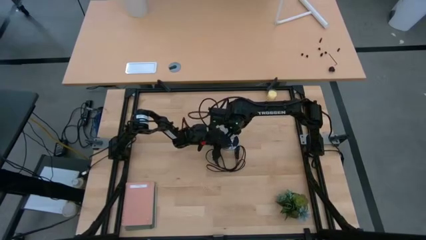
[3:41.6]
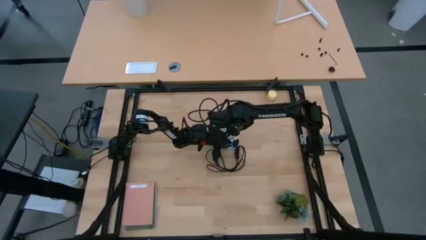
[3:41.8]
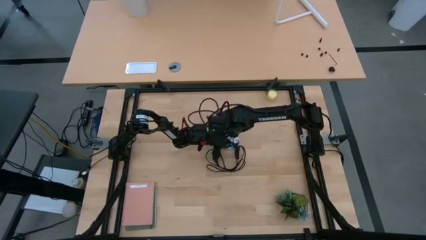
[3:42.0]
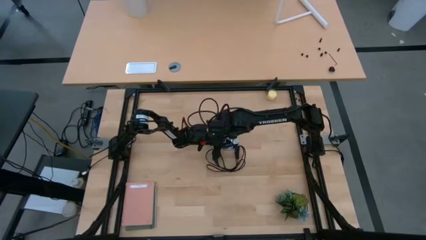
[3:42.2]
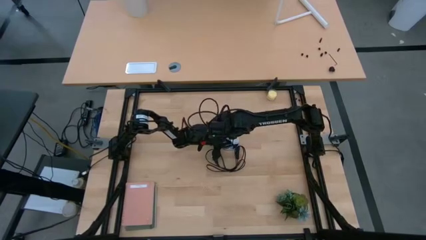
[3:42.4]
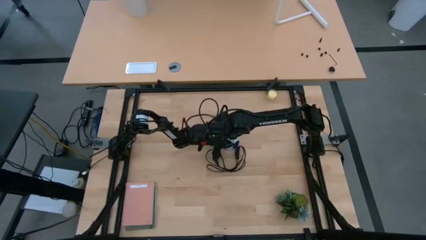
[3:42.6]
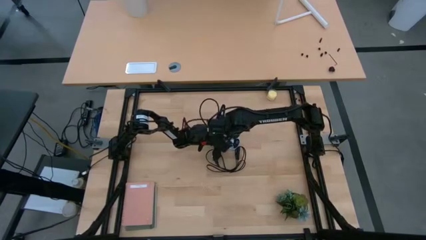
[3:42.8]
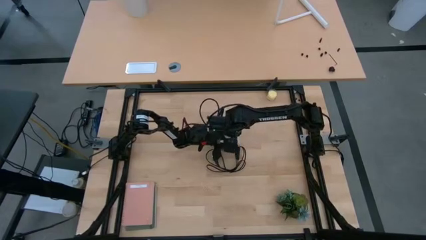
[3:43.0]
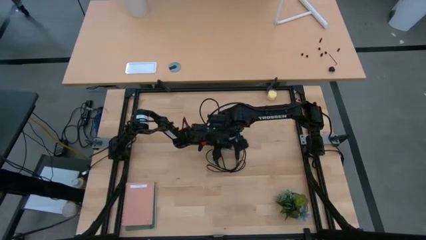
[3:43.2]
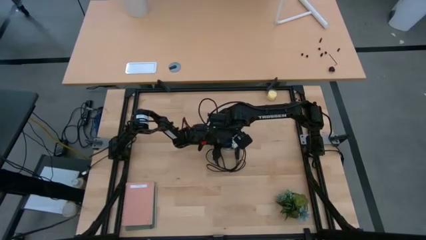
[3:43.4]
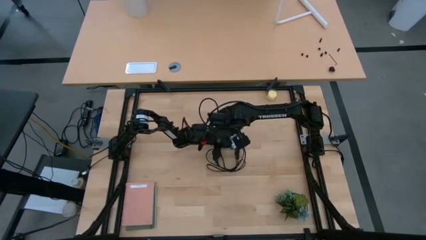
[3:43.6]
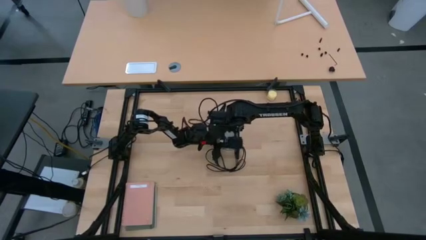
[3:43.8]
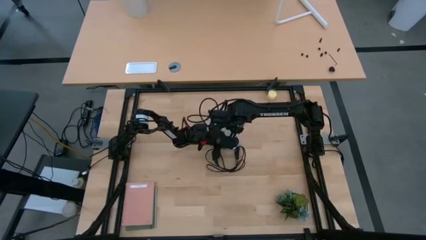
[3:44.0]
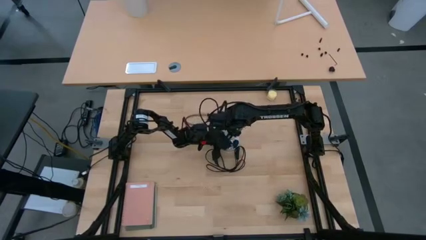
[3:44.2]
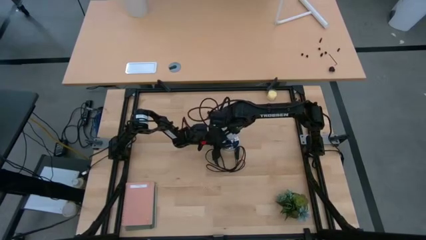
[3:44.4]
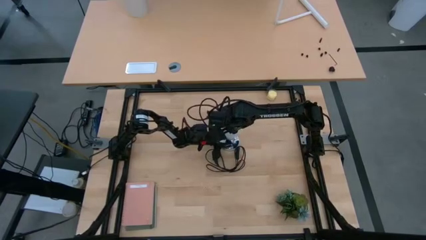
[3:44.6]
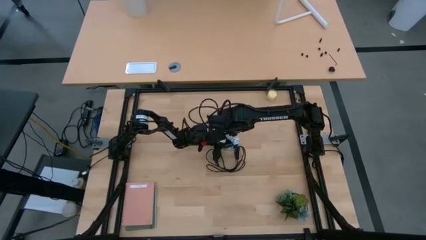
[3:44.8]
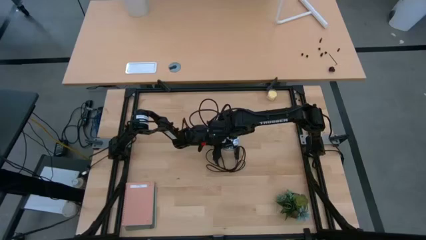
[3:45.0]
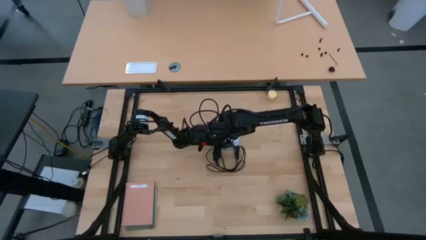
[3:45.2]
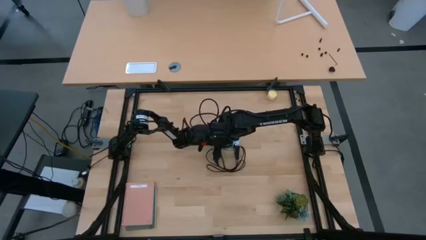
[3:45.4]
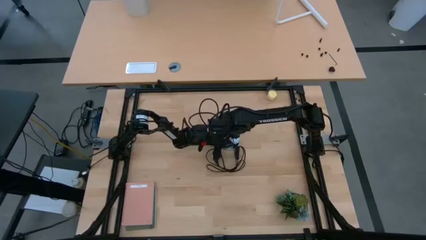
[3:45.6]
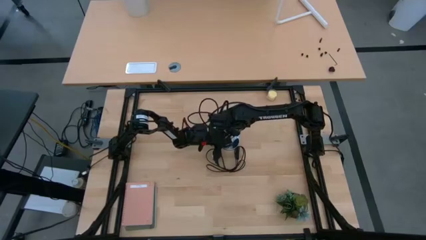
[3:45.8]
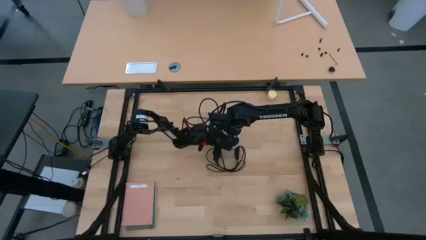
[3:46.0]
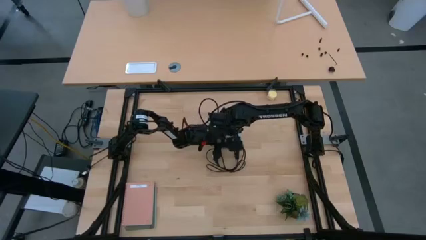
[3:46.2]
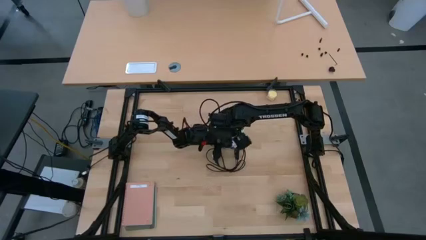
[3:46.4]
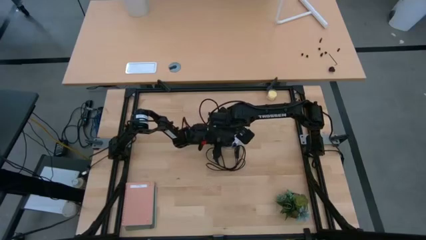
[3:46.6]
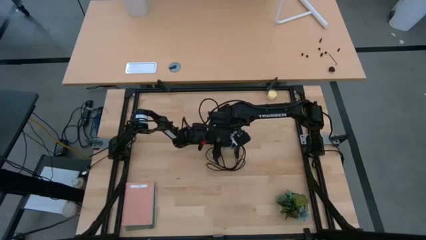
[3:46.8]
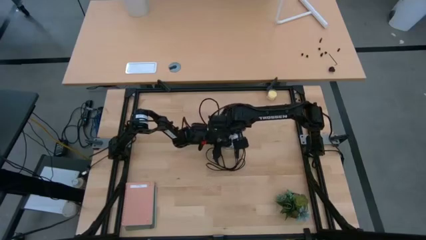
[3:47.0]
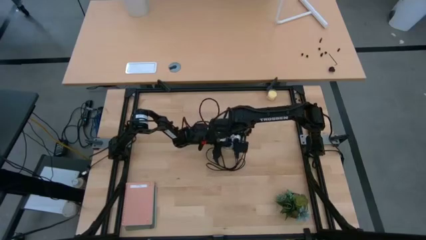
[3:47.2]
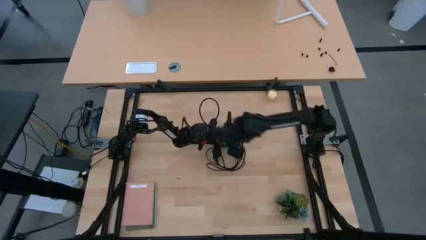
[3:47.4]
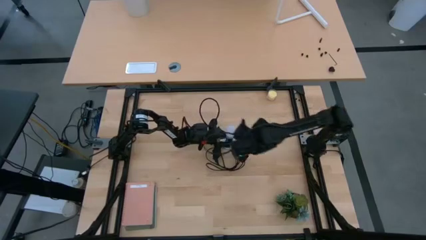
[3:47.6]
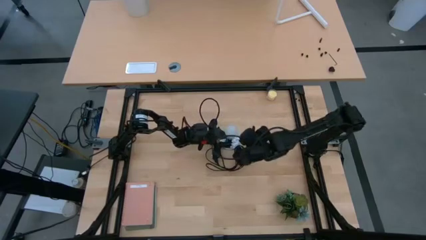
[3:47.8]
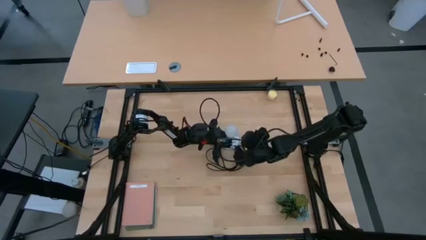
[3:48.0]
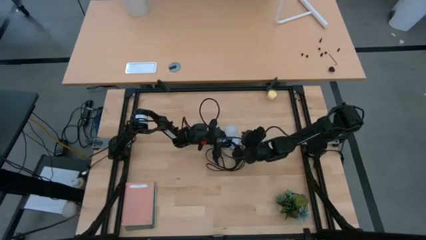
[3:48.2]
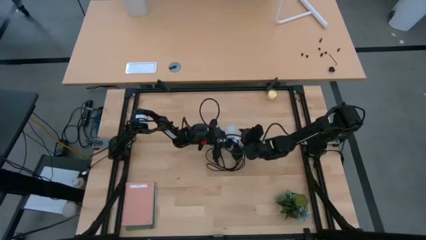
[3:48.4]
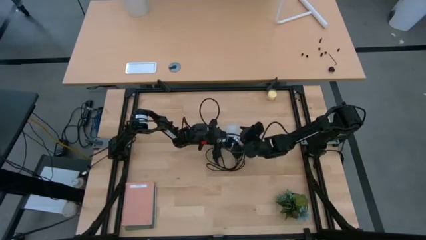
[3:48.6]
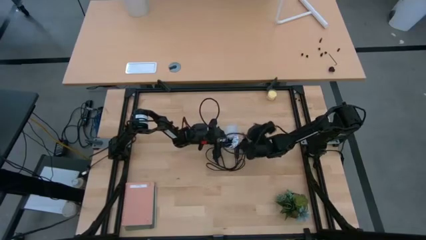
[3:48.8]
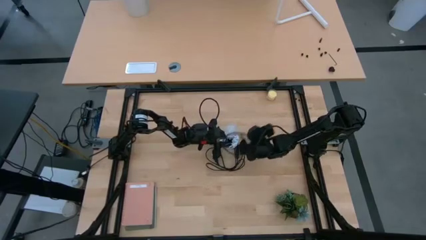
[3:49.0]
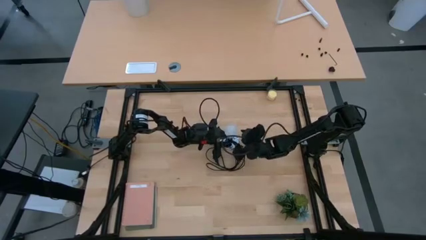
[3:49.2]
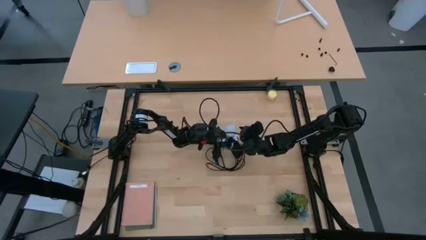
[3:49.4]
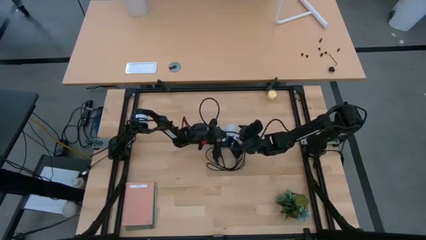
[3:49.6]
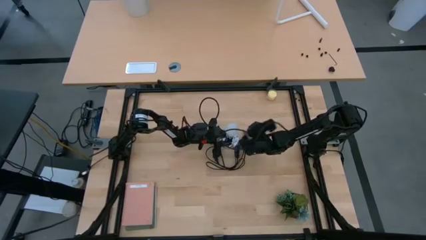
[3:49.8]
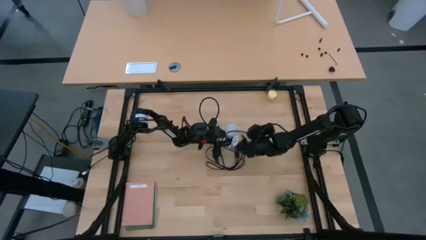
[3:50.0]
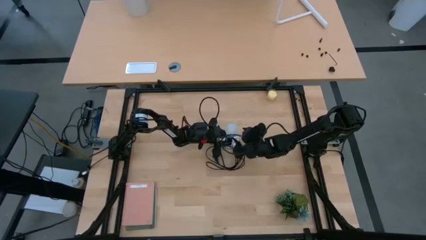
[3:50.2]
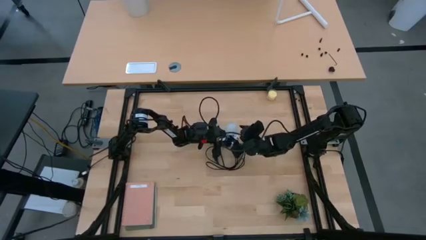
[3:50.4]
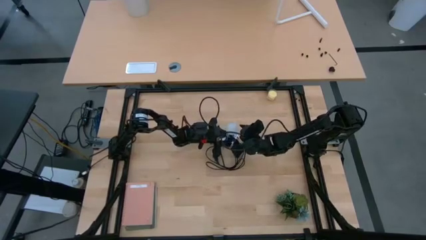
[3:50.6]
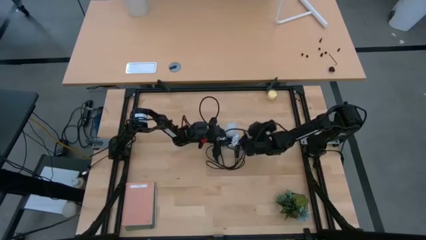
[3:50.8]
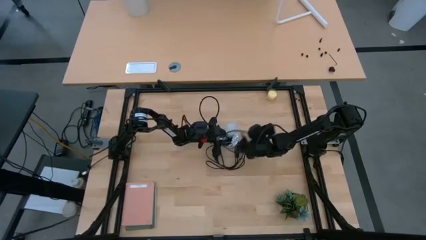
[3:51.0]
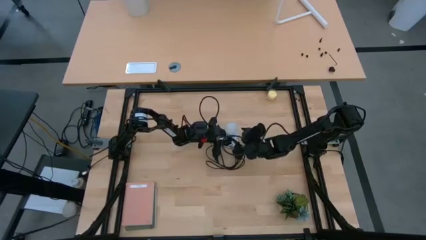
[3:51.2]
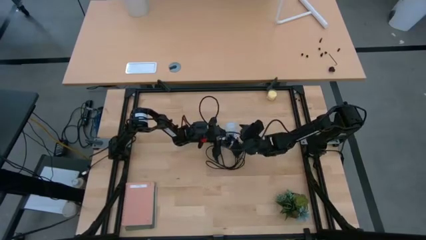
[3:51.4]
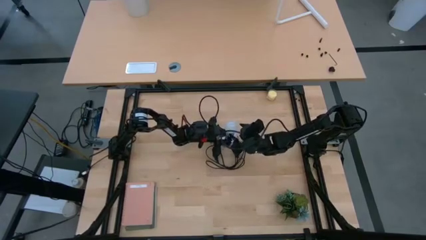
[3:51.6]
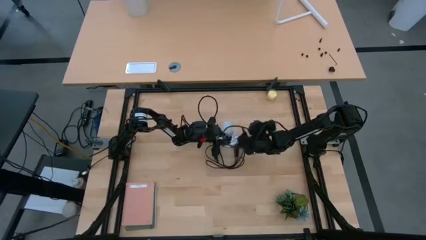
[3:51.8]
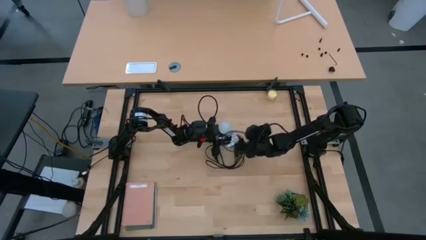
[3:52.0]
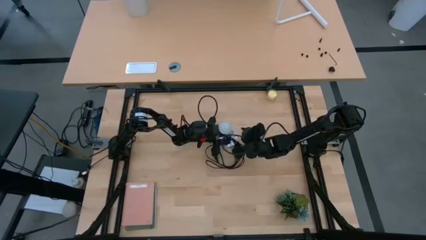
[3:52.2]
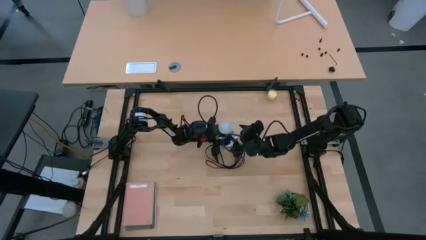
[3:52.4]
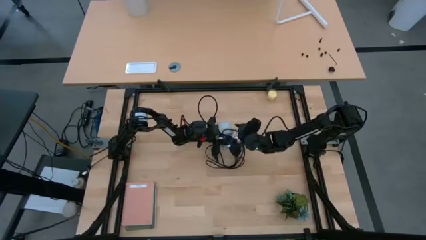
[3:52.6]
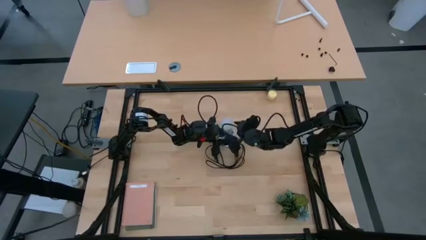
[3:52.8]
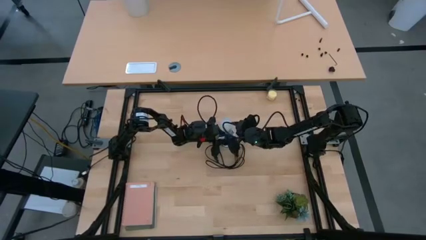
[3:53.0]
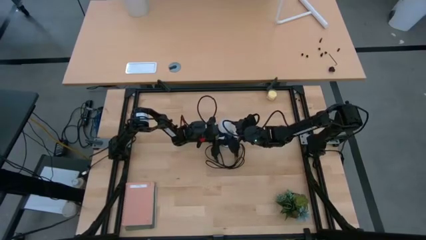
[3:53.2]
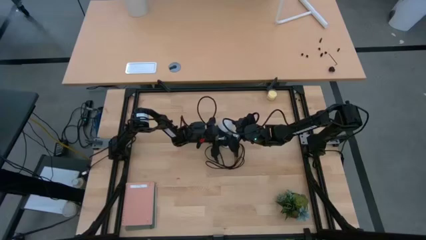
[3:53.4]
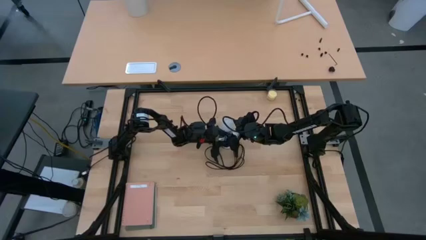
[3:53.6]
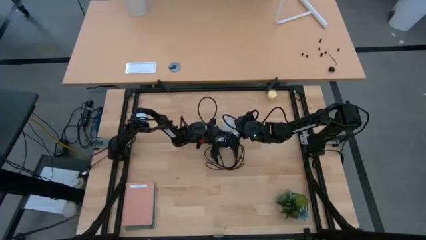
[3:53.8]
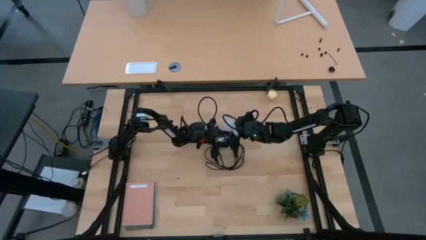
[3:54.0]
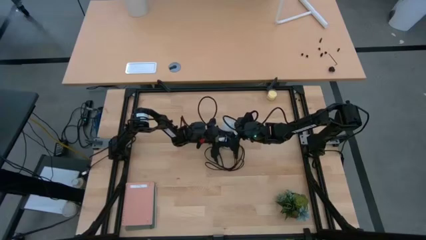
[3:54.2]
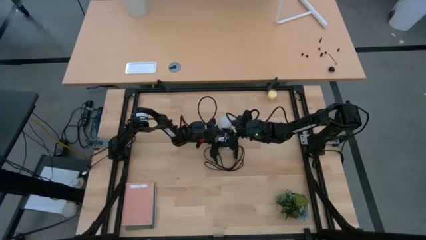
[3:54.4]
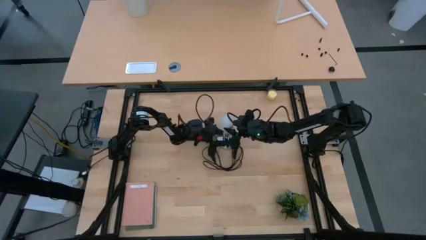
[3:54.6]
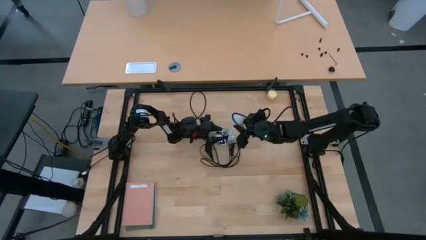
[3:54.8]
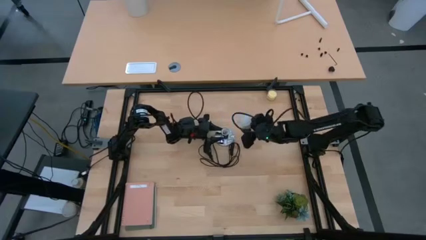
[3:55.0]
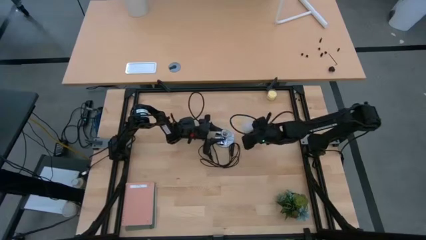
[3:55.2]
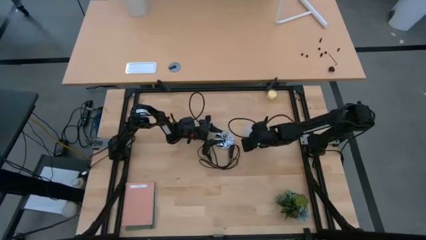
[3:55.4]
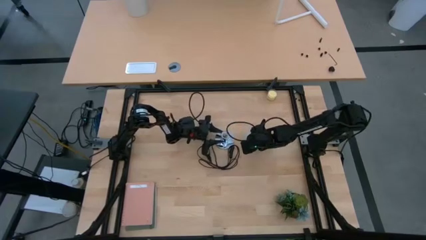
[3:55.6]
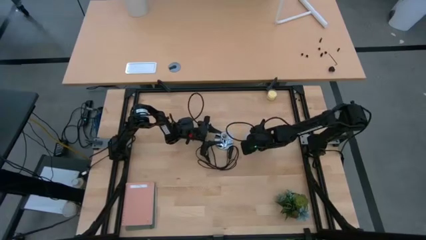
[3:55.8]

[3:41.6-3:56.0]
Task: Screw lightbulb
Remove the white lightbulb from the silver lamp
